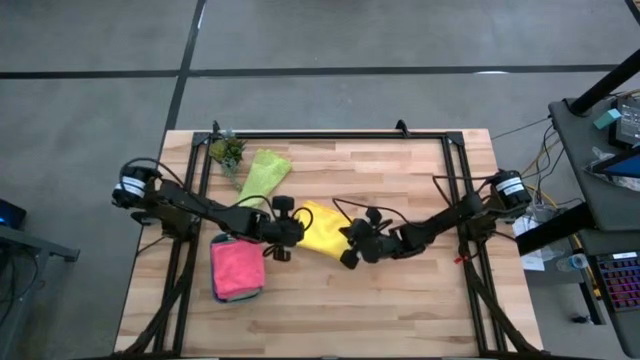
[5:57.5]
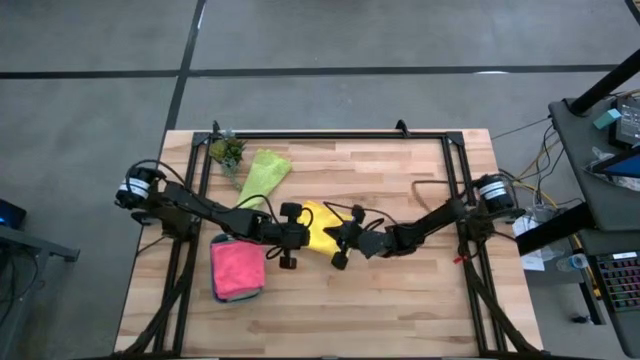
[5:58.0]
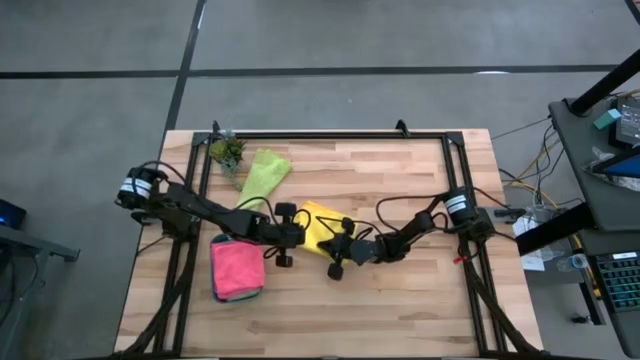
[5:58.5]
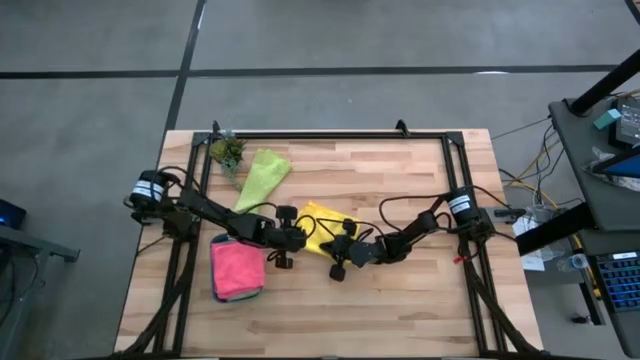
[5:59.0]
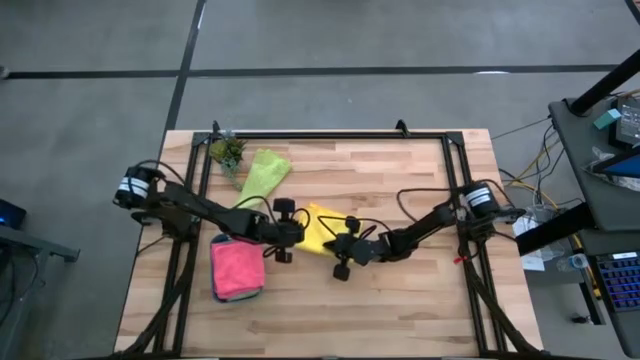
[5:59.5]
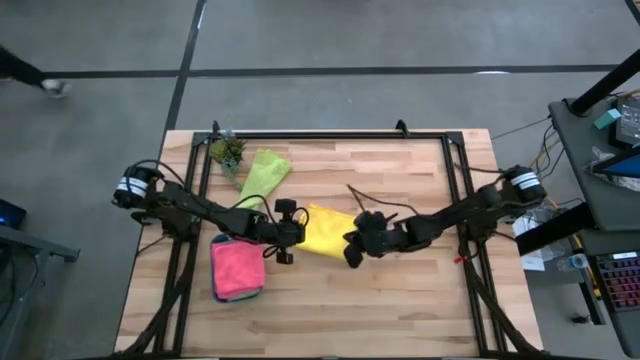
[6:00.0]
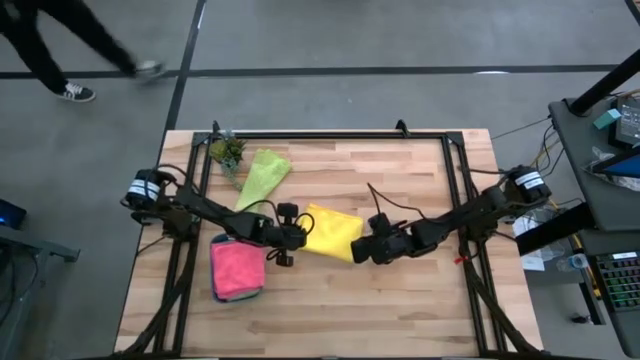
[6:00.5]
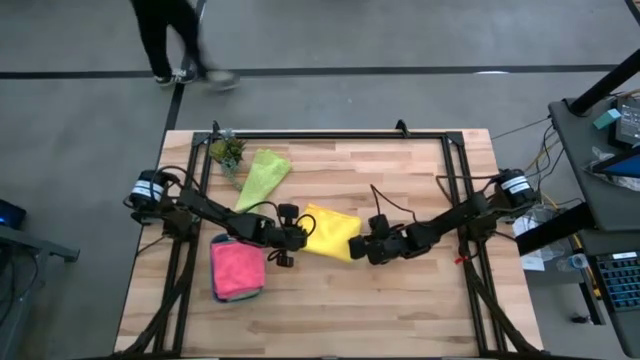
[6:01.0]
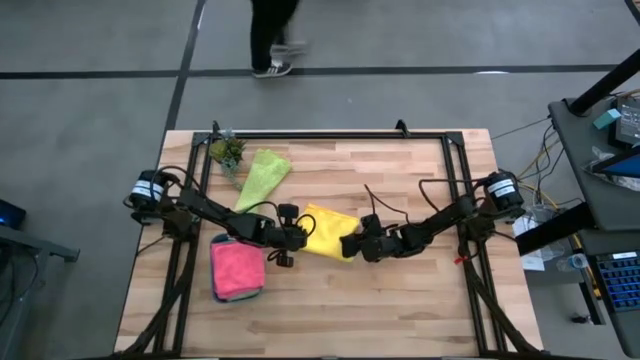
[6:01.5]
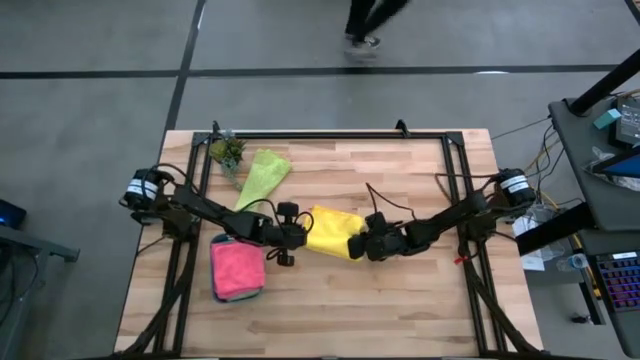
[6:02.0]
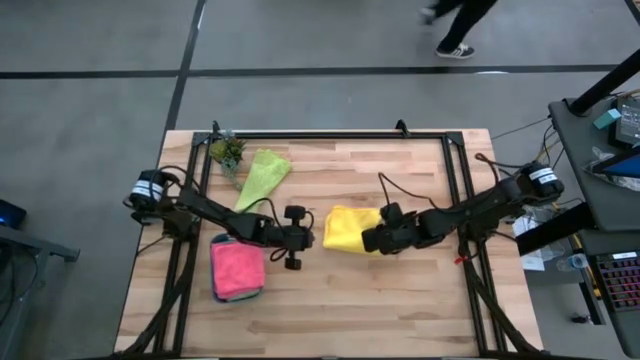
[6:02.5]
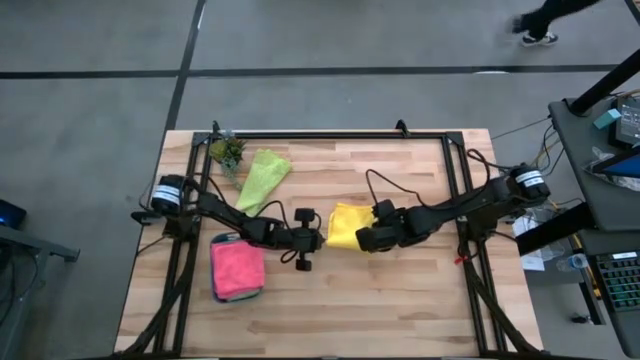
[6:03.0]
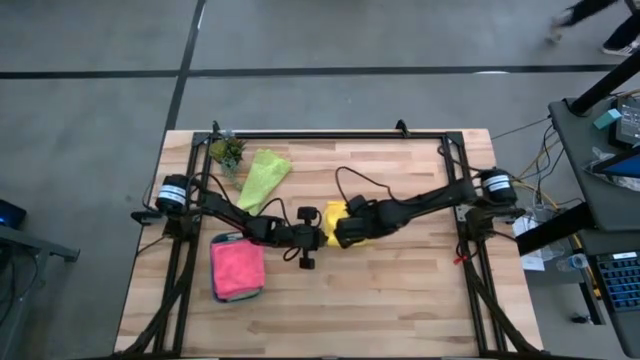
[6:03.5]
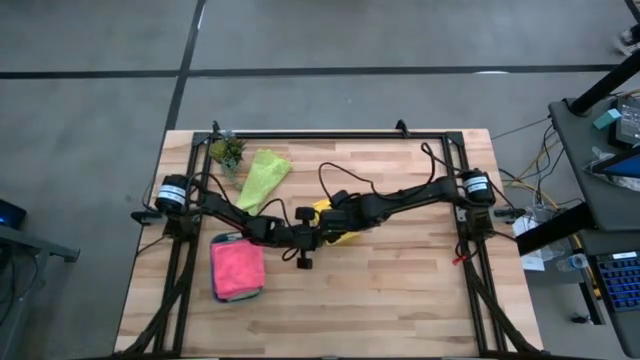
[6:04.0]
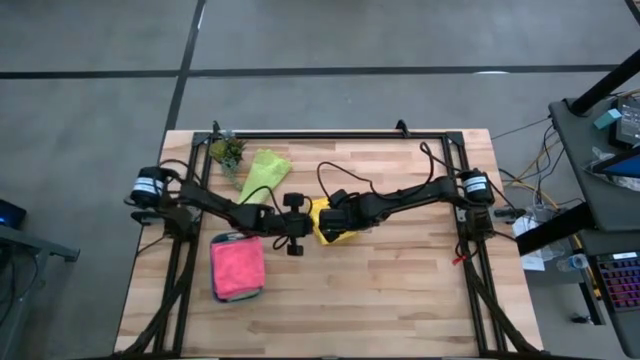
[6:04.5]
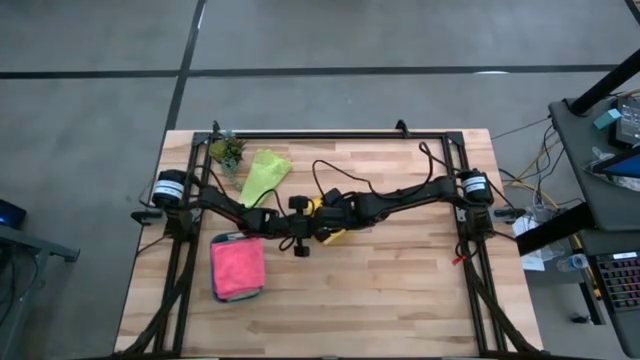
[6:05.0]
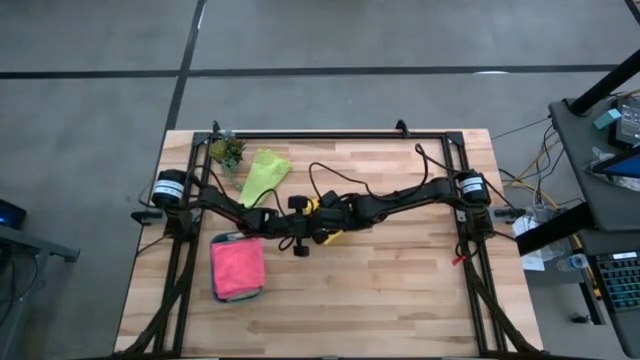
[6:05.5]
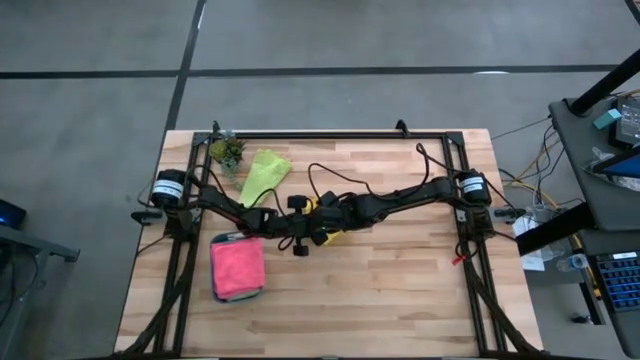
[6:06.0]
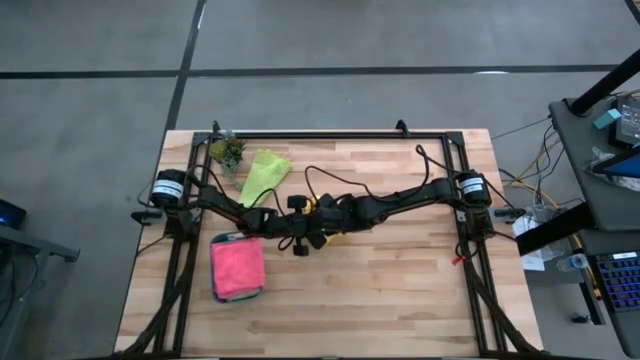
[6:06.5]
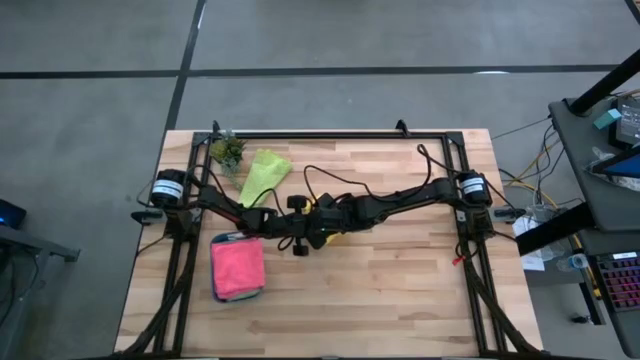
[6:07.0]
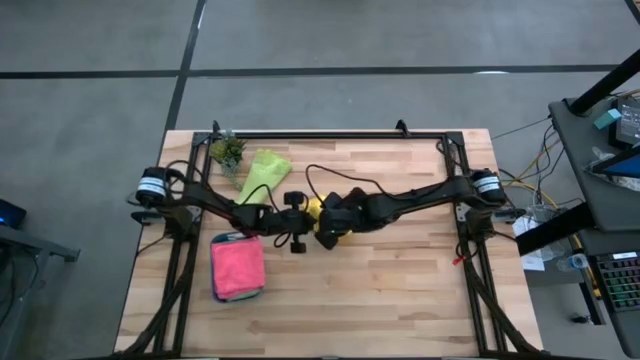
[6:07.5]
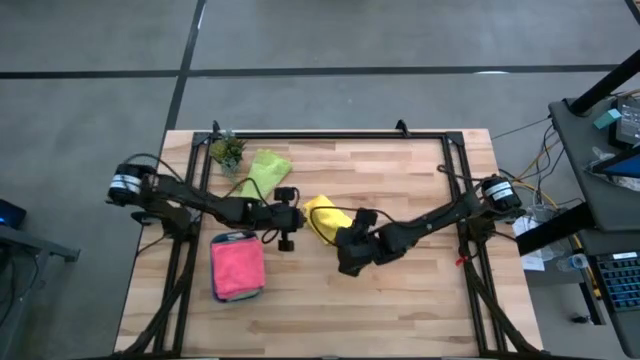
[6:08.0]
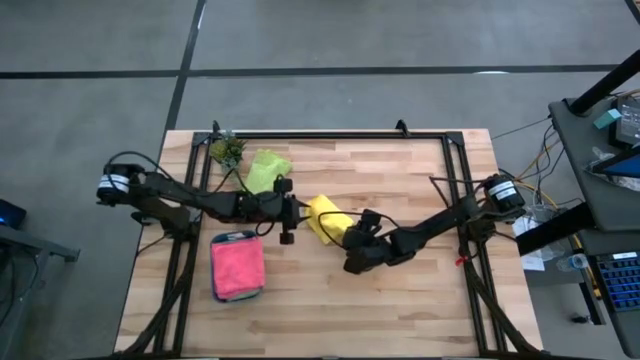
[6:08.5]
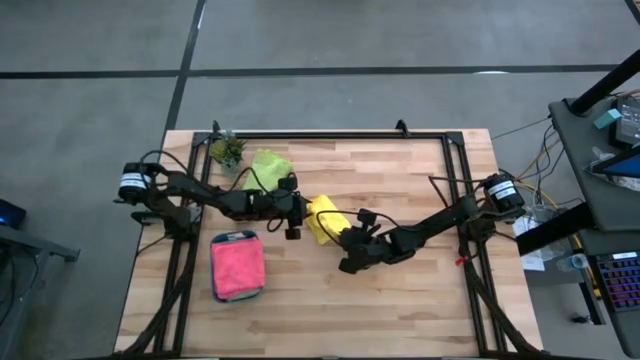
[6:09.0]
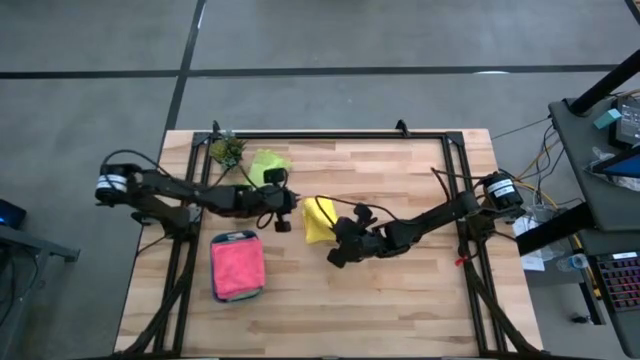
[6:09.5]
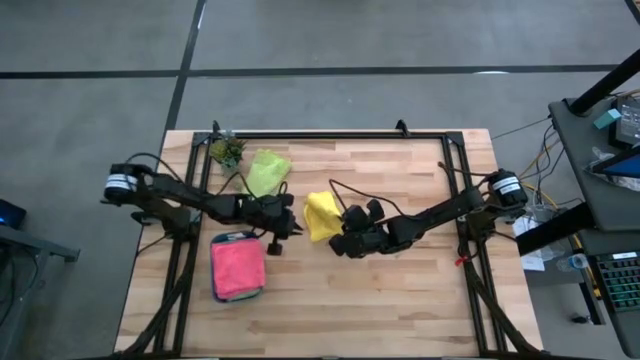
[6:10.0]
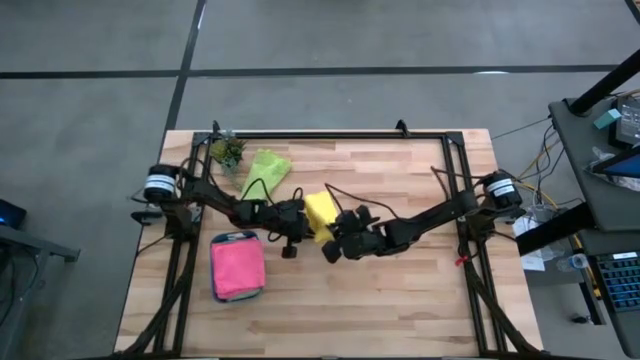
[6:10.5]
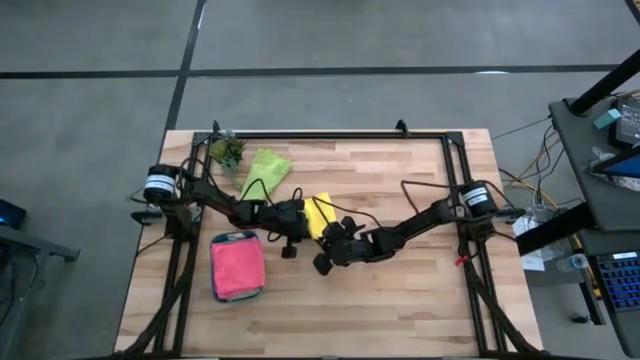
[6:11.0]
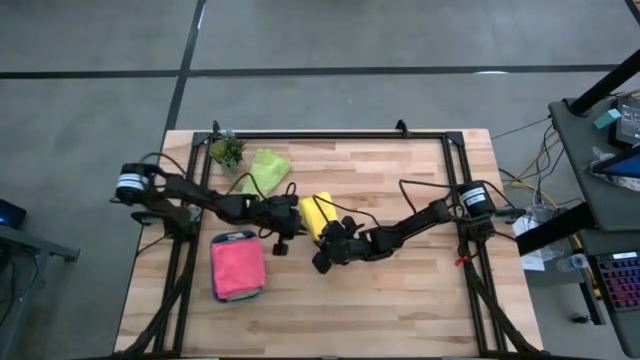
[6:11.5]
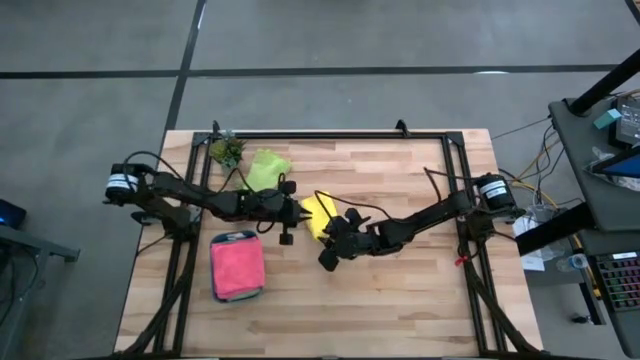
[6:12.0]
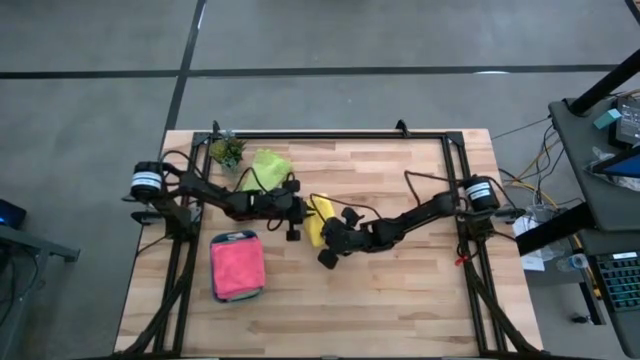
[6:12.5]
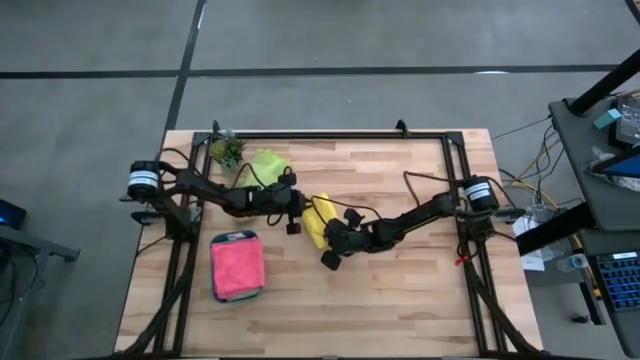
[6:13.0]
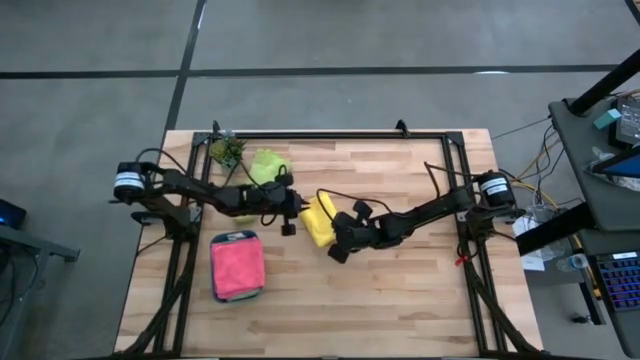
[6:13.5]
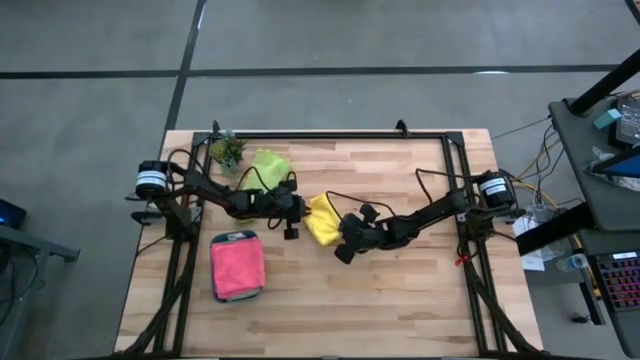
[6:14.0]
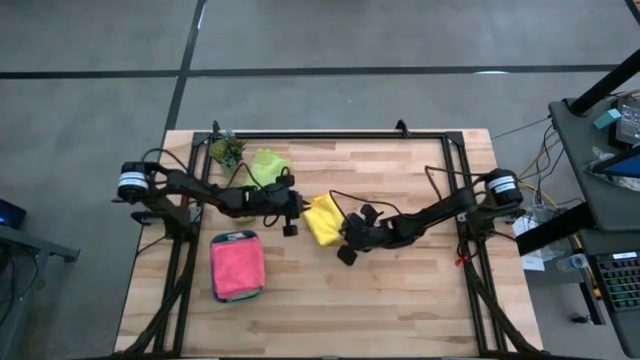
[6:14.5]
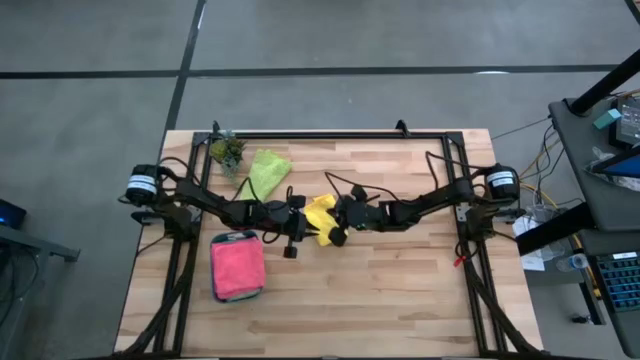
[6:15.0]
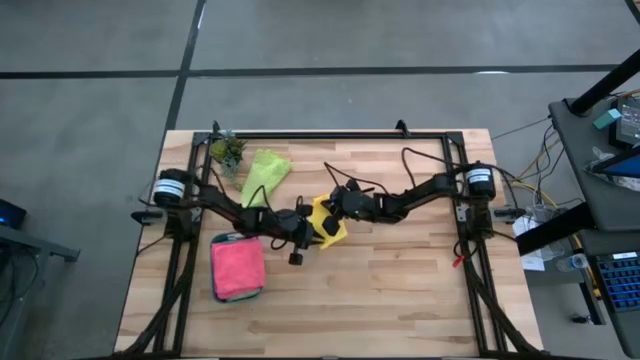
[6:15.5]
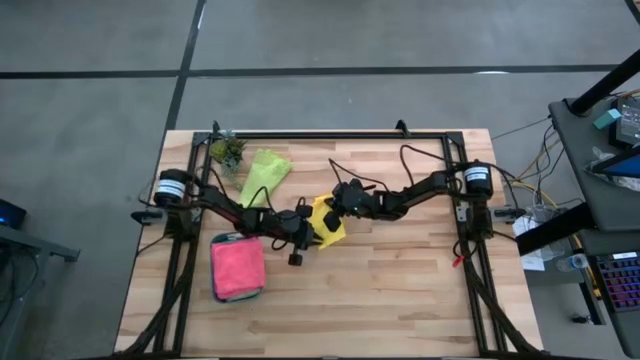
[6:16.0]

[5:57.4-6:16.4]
Task: Fold microfiber towels
Fold the yellow microfiber cloth

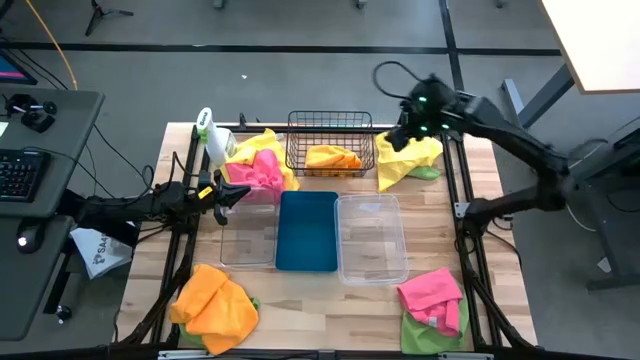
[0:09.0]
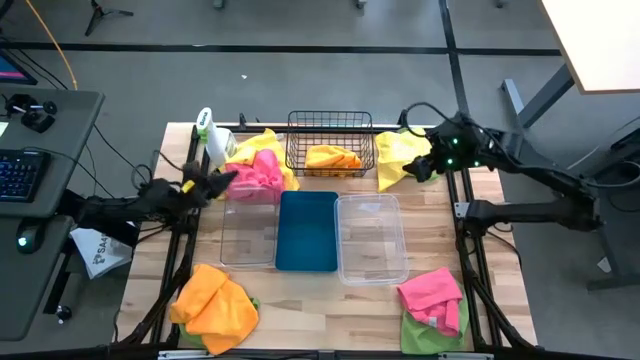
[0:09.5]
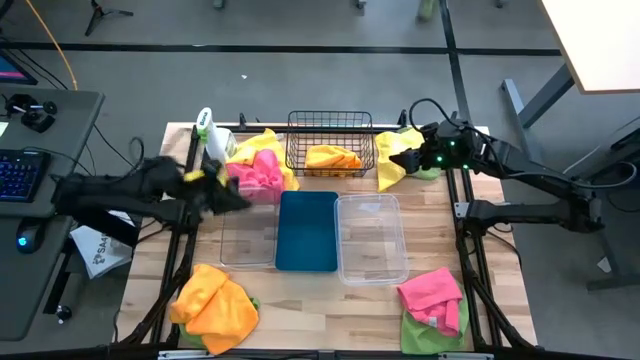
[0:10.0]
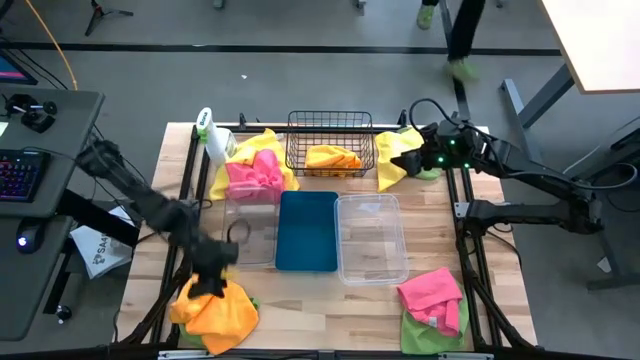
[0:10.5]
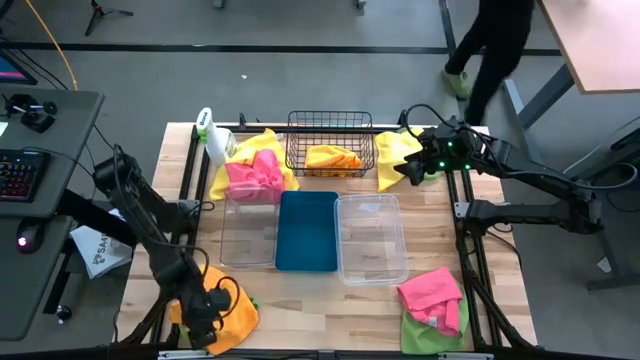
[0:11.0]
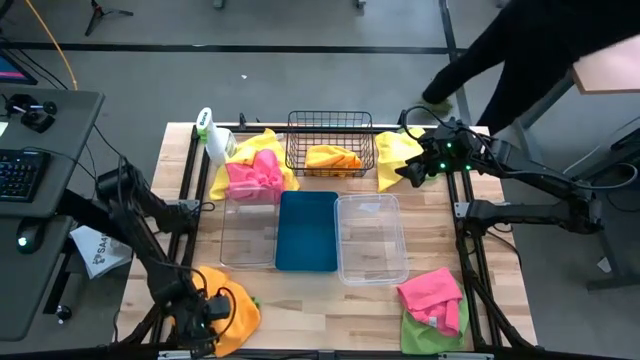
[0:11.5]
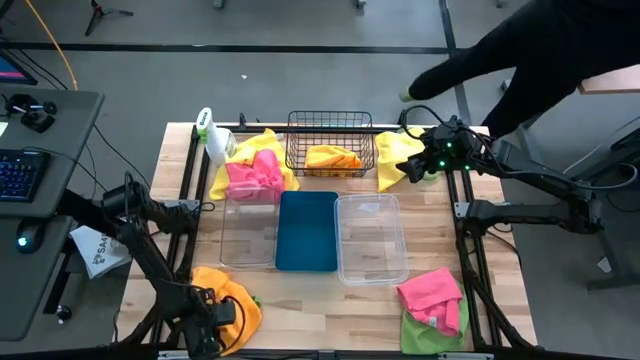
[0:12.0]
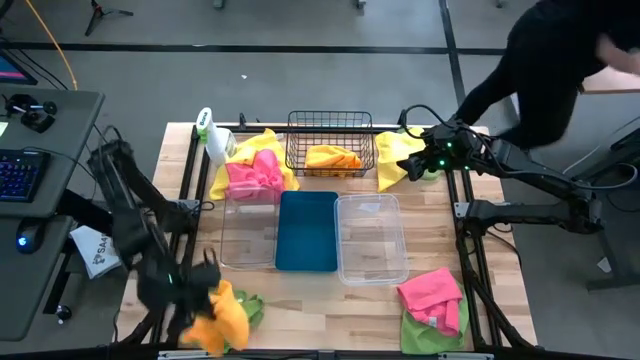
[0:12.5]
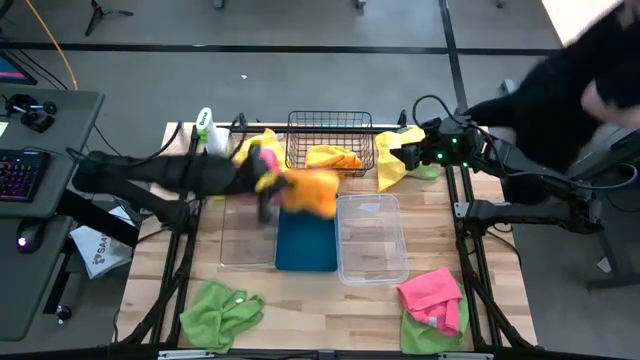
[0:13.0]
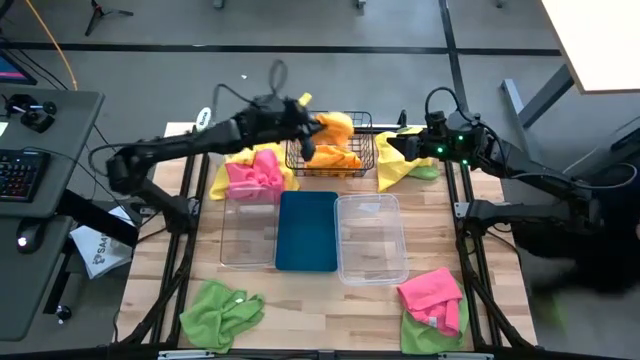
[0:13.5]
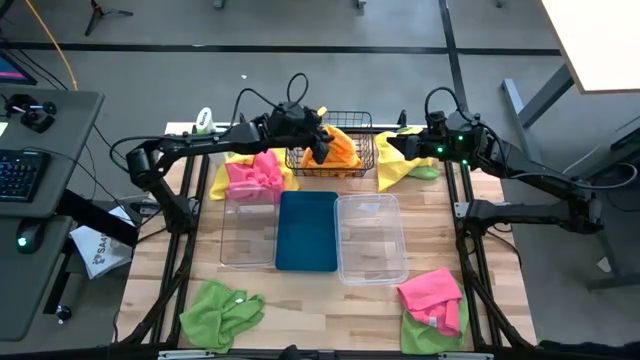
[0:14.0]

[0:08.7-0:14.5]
Task: Sort microfiber towel by color & place in baskets
Put the orange microfiber cloth into the wire basket
